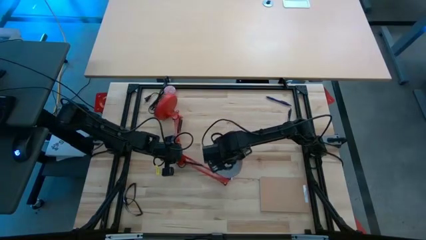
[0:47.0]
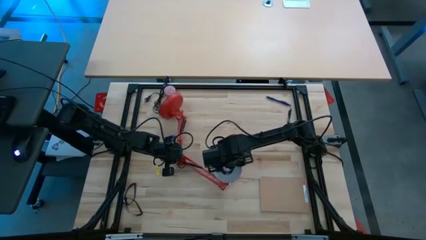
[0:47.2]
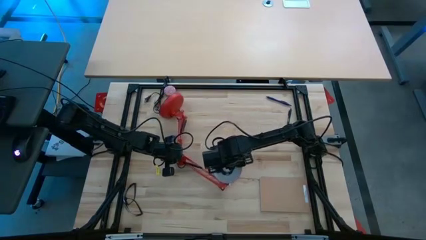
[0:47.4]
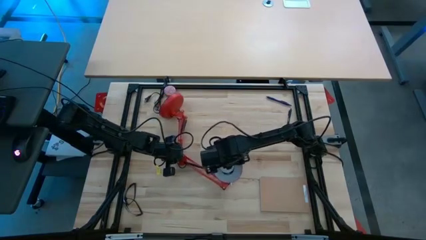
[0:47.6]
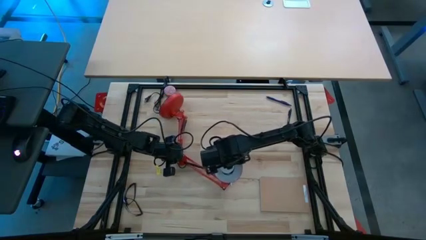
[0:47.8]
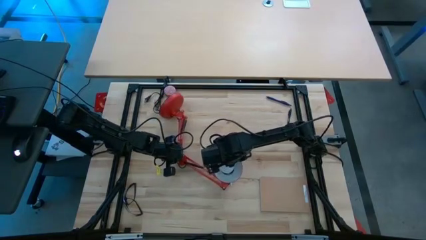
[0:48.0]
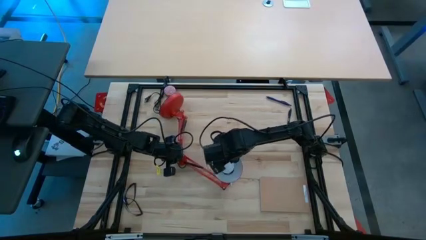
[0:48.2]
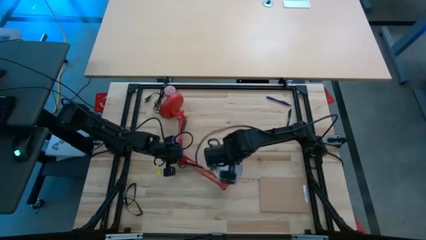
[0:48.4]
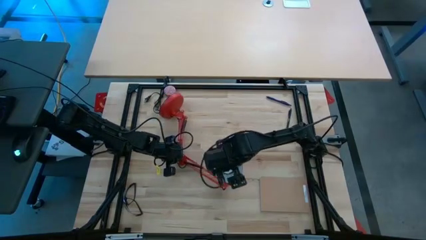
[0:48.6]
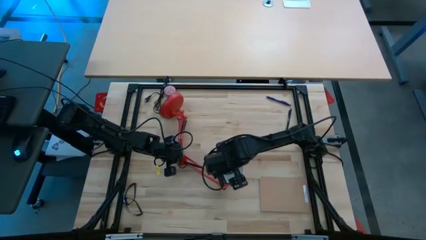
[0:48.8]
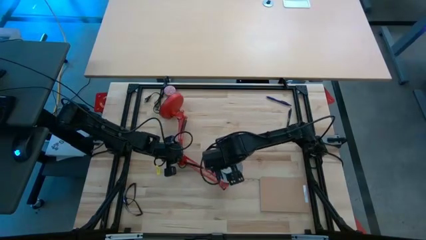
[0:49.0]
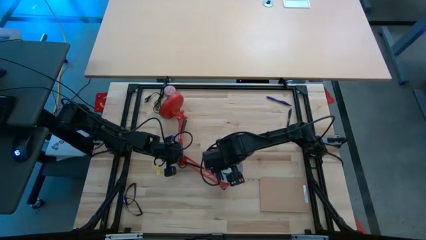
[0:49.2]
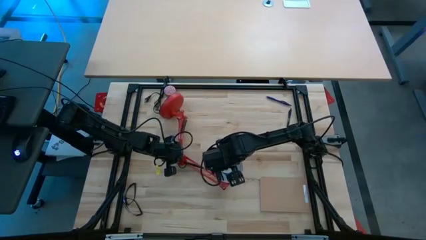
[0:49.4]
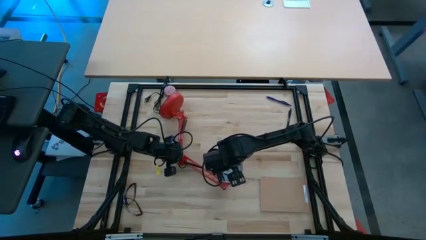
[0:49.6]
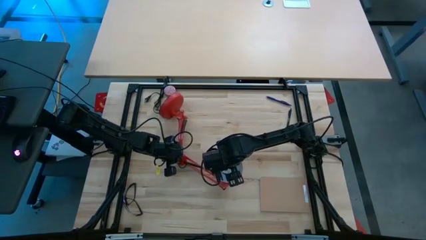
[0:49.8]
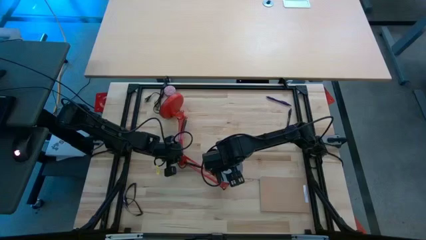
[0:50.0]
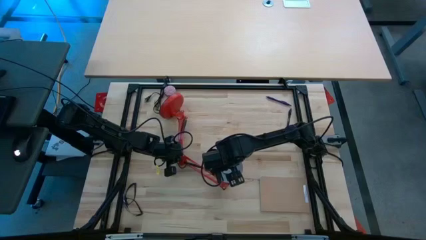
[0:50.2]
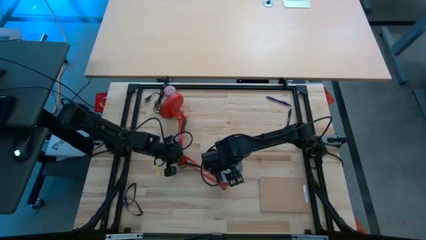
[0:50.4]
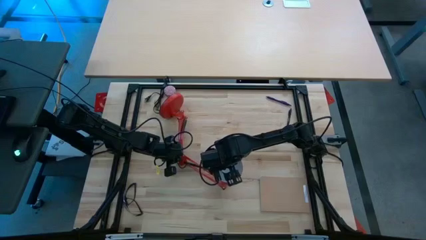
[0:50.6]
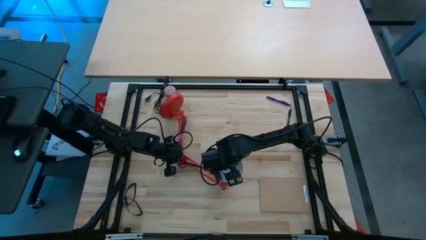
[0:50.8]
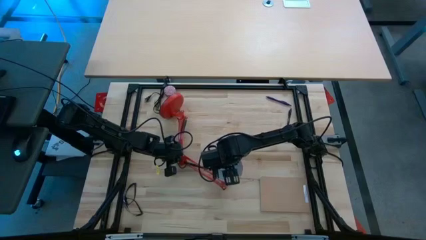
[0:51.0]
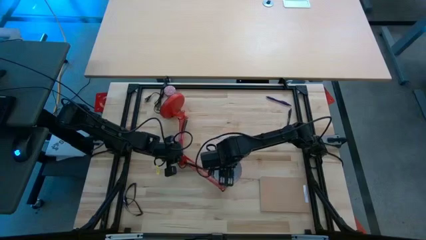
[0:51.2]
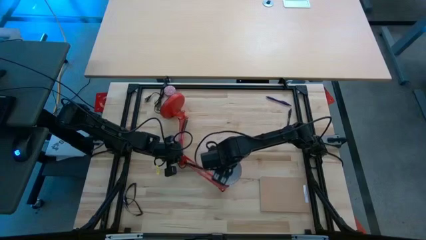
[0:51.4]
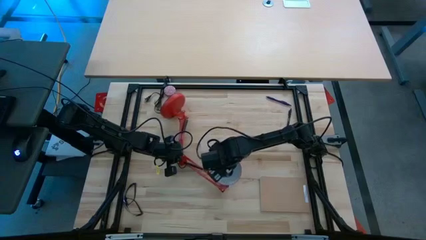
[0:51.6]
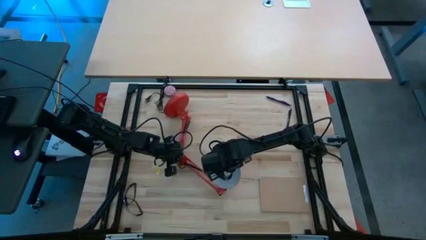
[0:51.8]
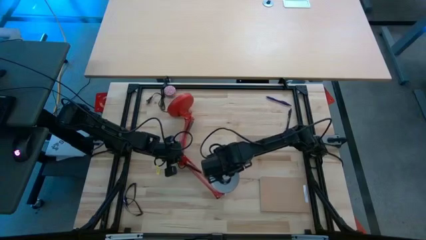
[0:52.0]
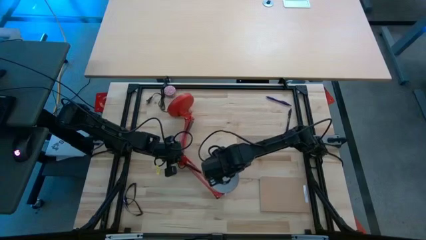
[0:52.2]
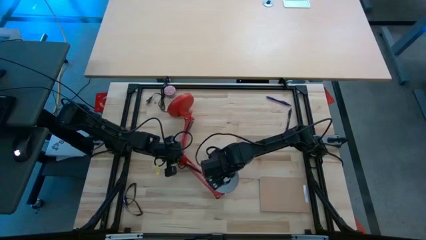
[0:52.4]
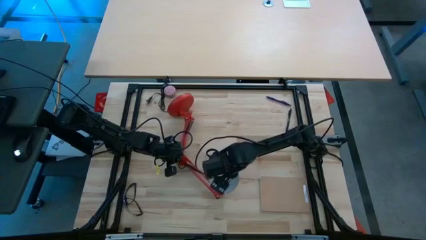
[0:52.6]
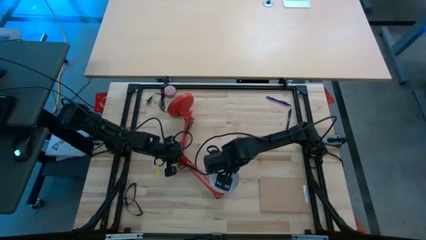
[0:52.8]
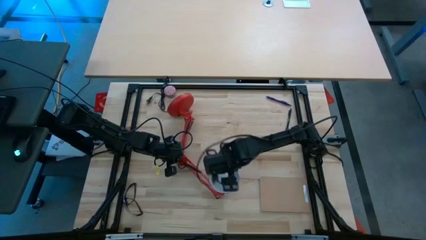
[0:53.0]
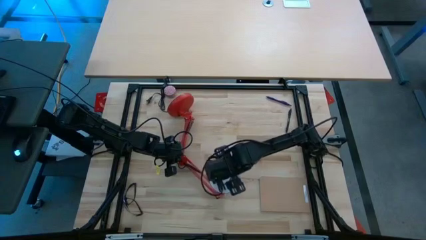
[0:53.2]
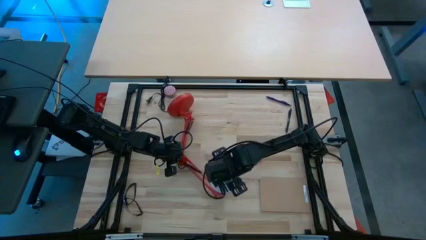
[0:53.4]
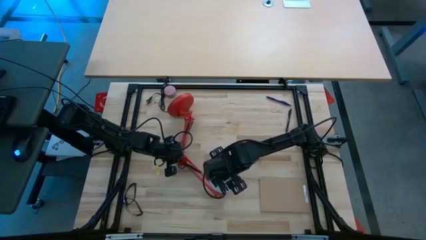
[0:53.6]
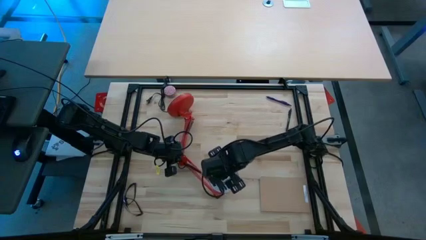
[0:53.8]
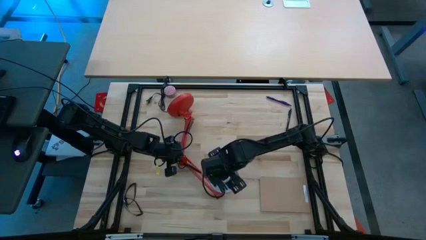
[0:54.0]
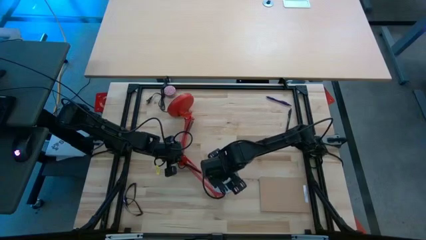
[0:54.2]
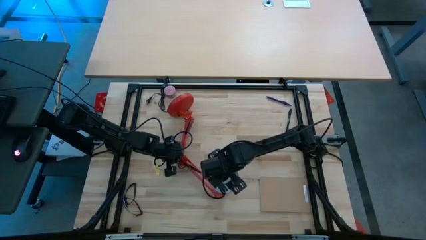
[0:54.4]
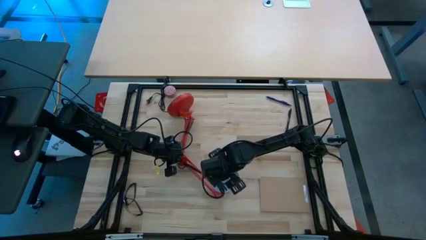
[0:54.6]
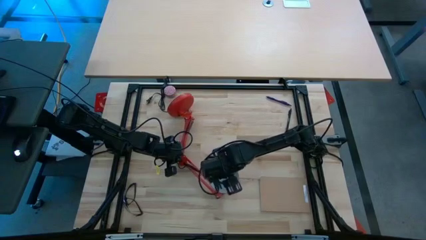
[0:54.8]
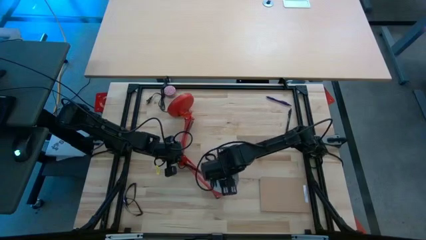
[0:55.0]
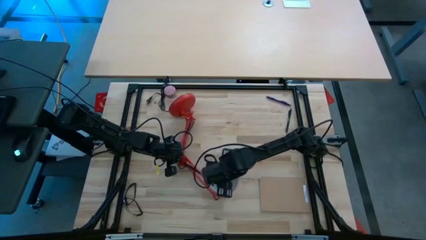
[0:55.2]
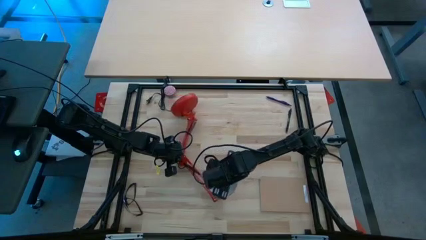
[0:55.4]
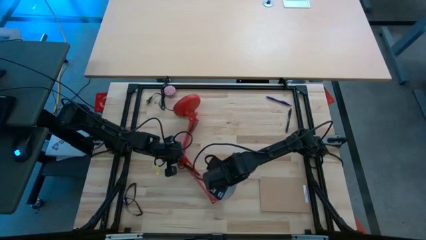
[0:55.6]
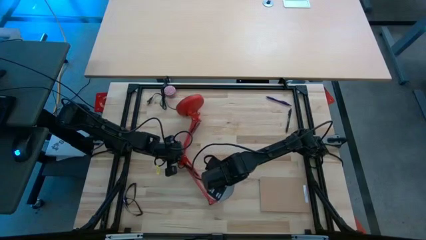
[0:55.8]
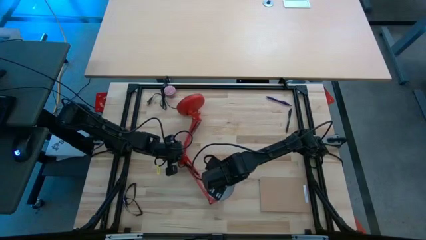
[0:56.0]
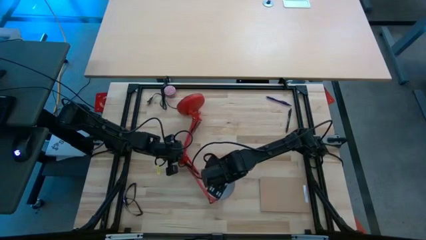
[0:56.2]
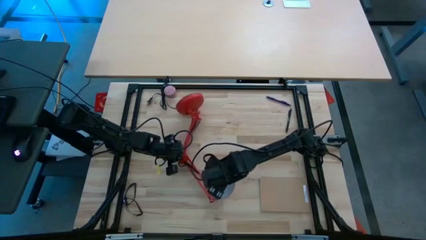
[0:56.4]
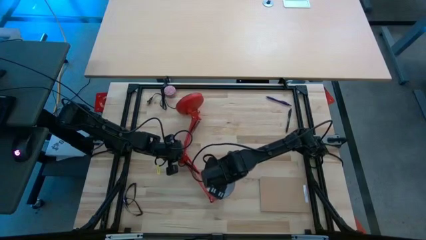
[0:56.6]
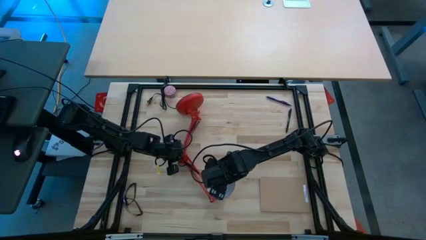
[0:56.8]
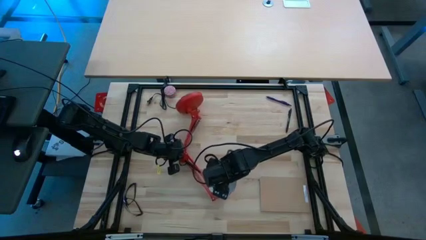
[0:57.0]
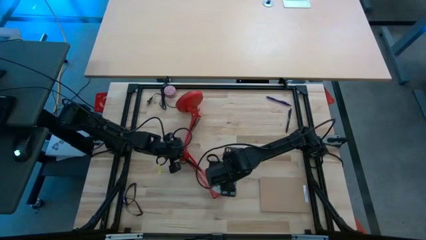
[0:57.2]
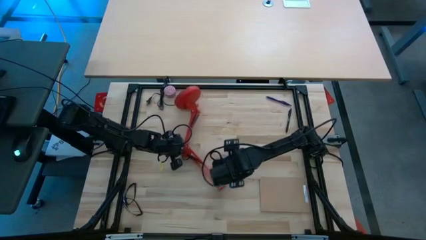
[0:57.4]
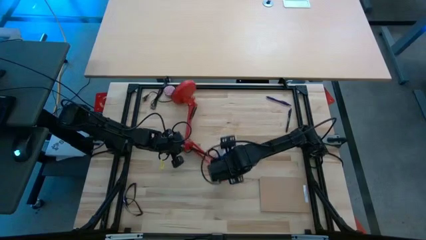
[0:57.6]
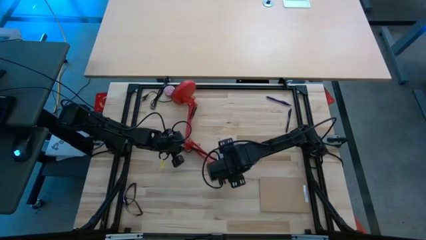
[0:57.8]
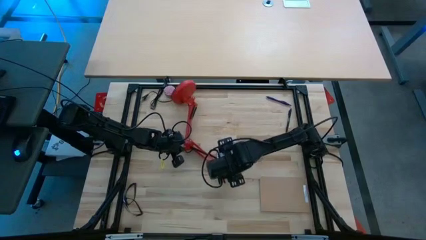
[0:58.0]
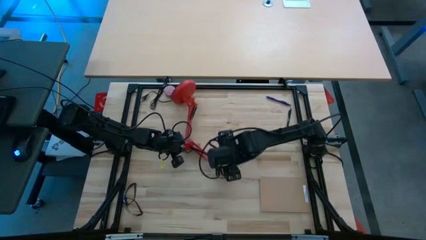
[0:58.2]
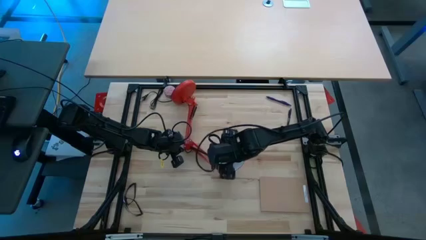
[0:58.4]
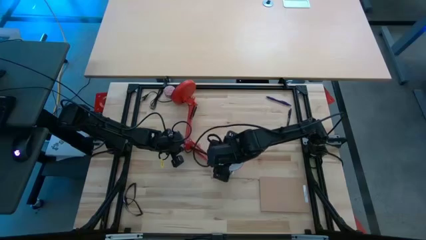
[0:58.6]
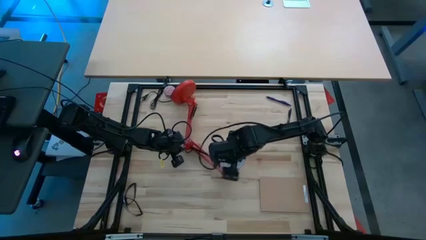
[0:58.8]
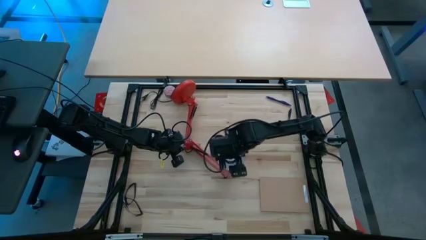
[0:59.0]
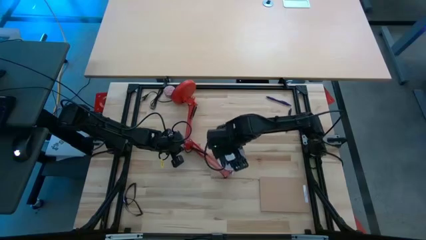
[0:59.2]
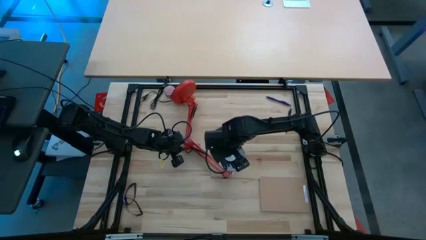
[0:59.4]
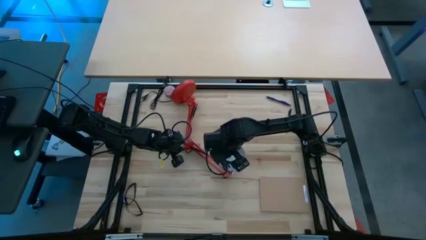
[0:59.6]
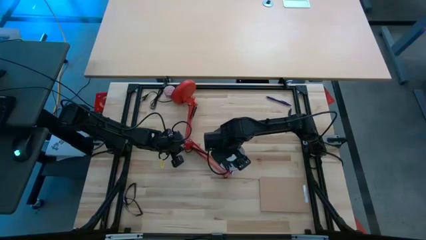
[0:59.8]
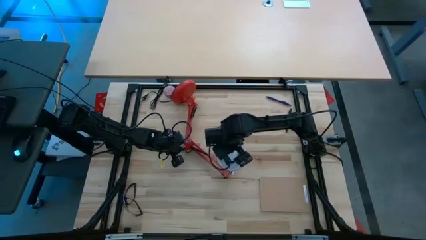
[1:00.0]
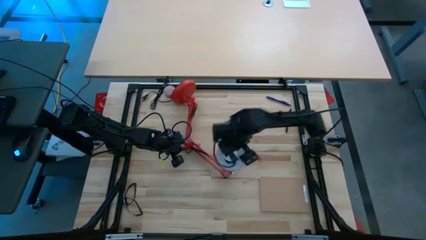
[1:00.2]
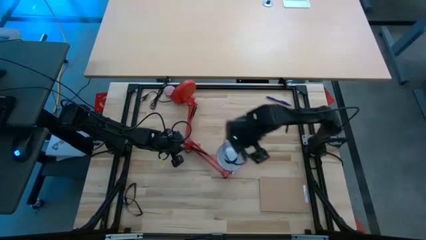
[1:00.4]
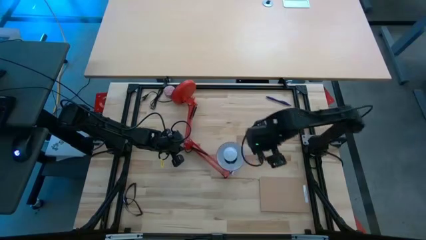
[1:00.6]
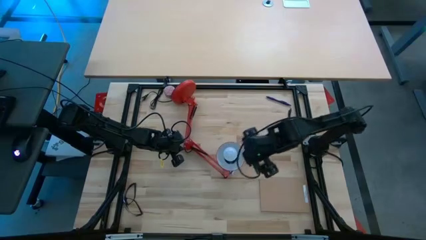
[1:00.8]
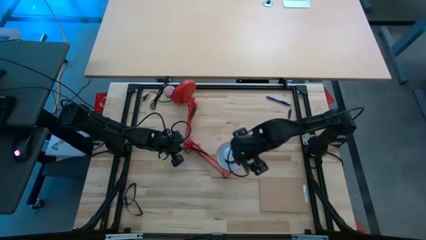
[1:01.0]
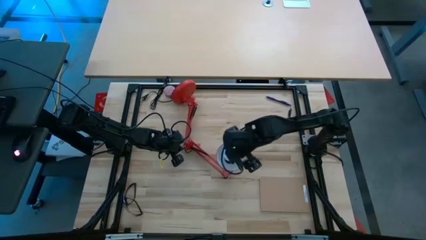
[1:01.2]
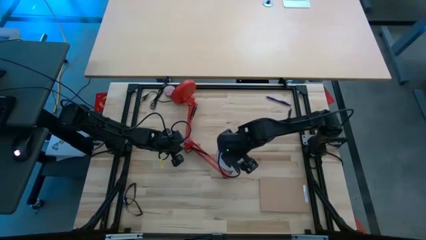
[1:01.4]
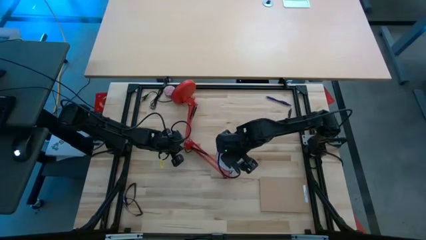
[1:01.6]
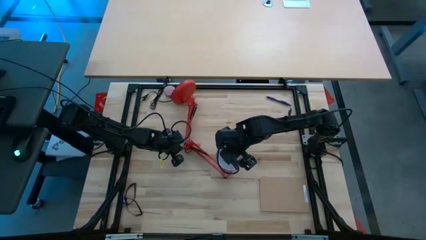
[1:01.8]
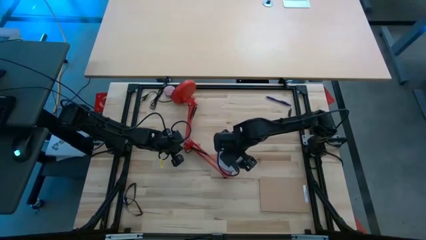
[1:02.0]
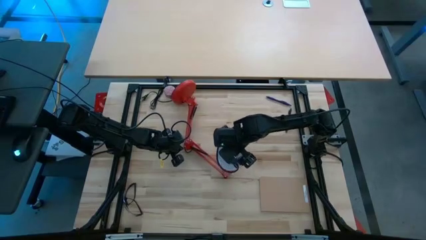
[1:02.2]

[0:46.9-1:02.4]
Task: Screw lightbulb
Insert the lightbulb into the desk lamp
